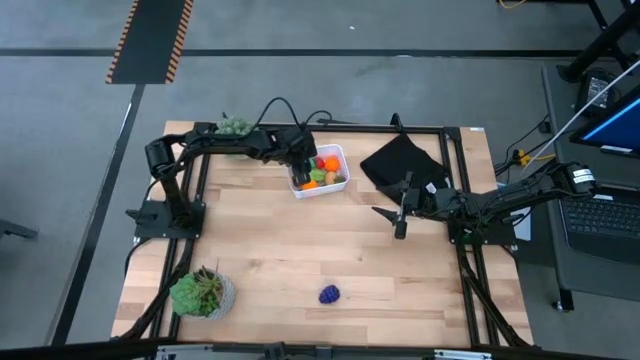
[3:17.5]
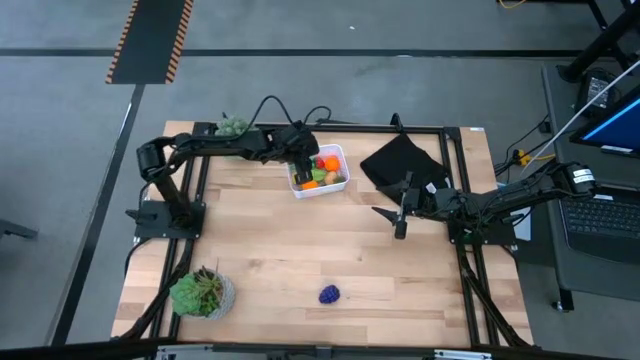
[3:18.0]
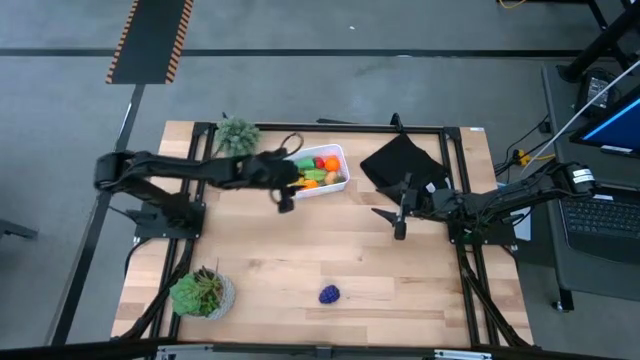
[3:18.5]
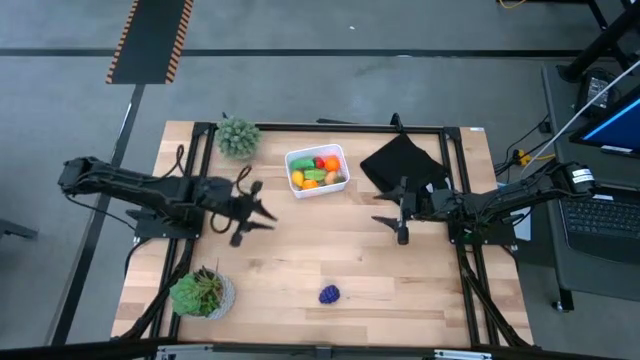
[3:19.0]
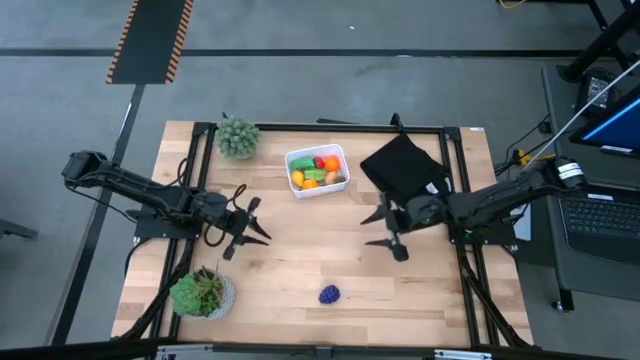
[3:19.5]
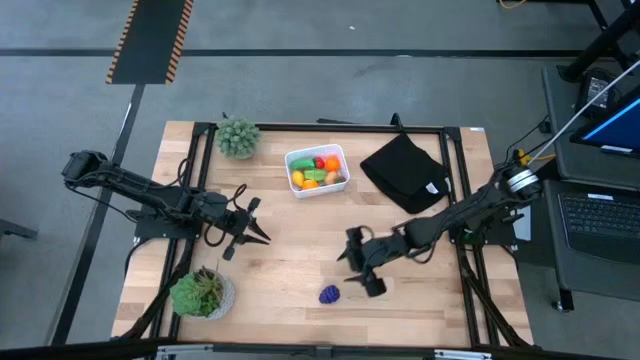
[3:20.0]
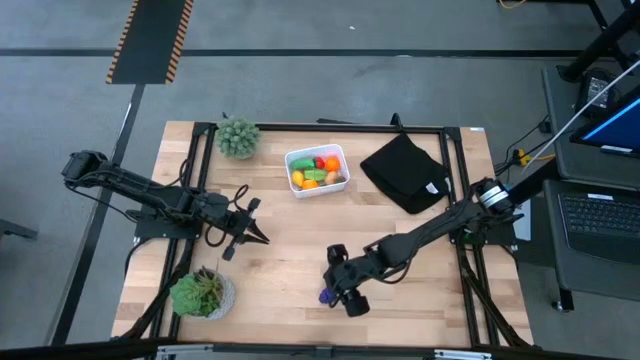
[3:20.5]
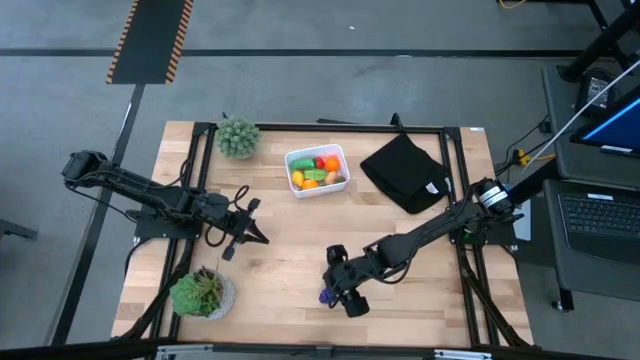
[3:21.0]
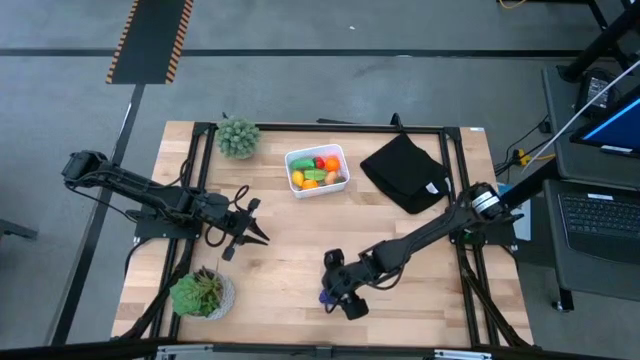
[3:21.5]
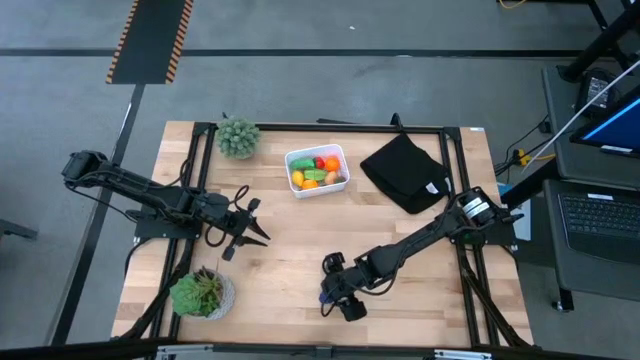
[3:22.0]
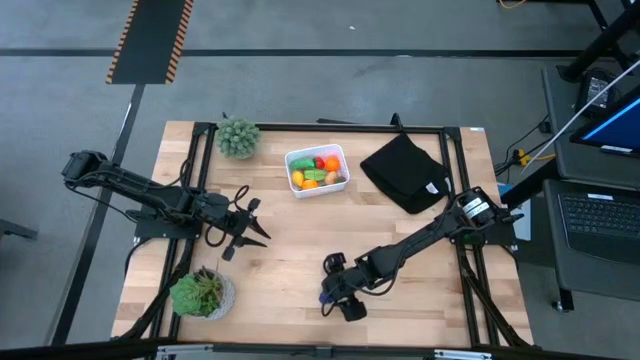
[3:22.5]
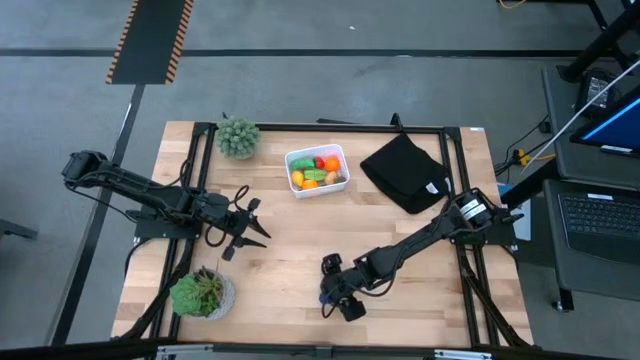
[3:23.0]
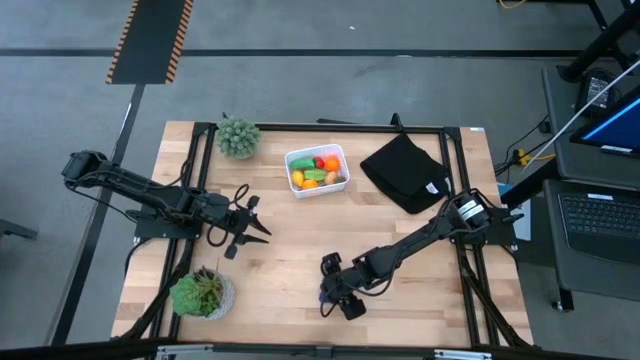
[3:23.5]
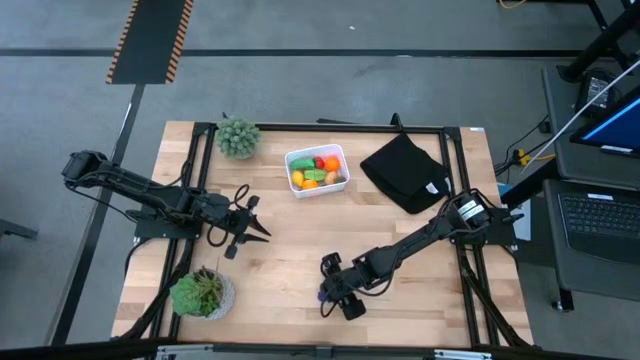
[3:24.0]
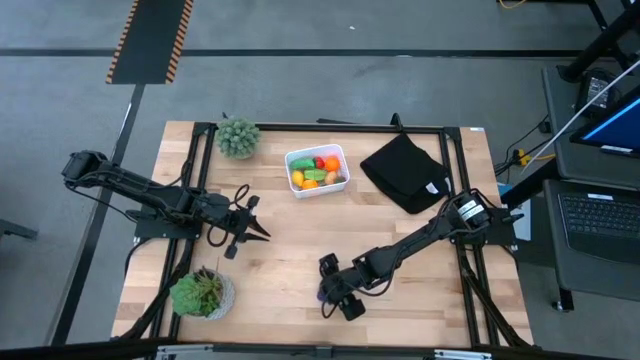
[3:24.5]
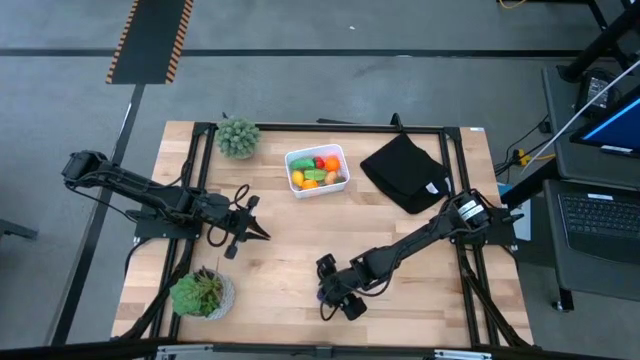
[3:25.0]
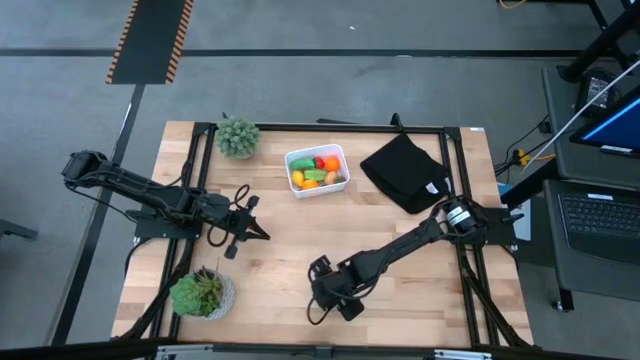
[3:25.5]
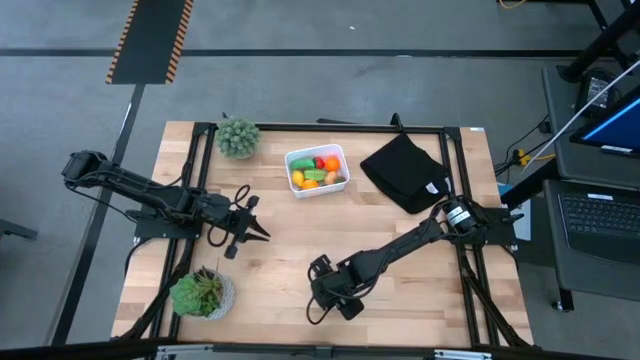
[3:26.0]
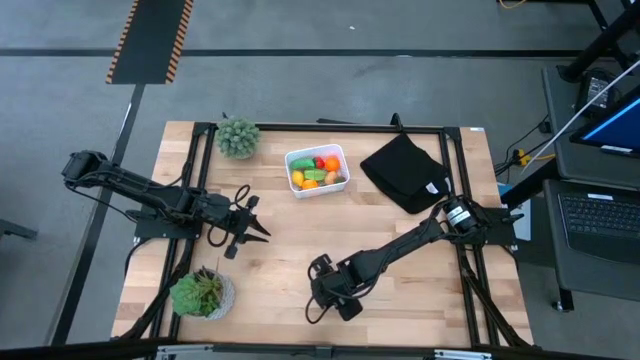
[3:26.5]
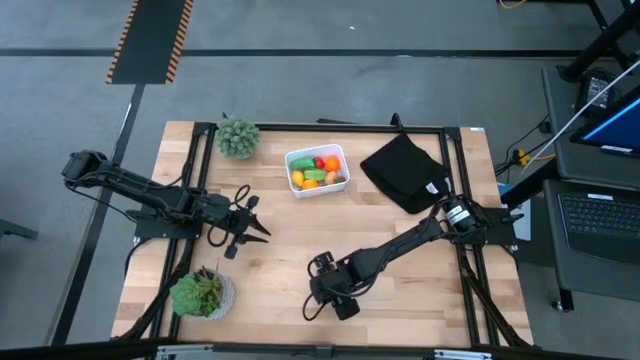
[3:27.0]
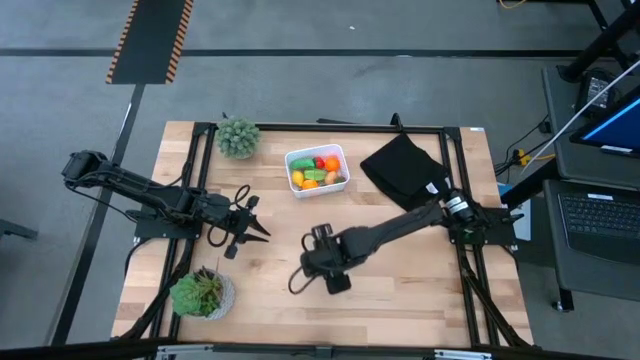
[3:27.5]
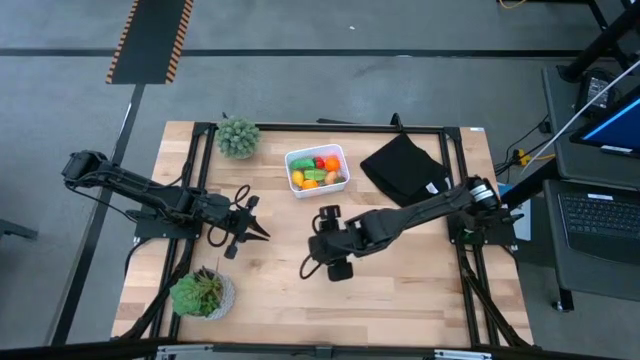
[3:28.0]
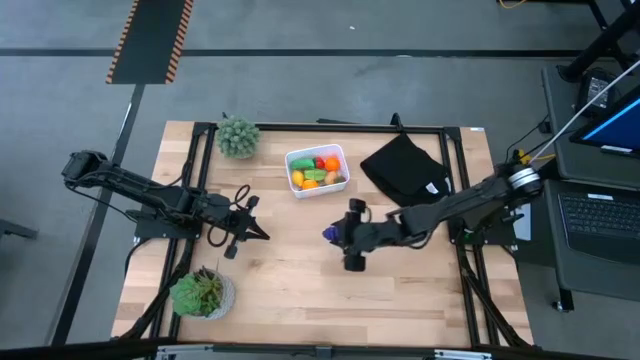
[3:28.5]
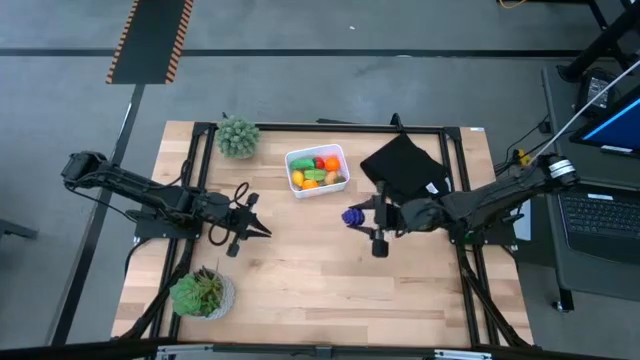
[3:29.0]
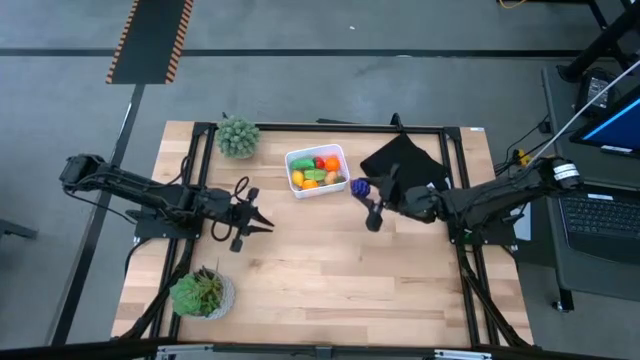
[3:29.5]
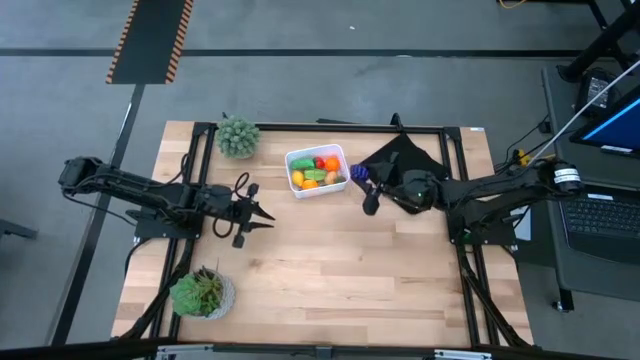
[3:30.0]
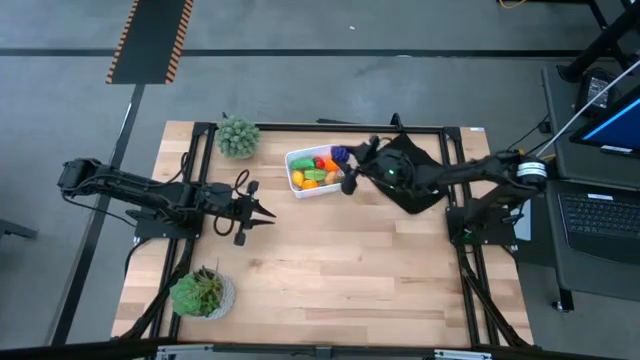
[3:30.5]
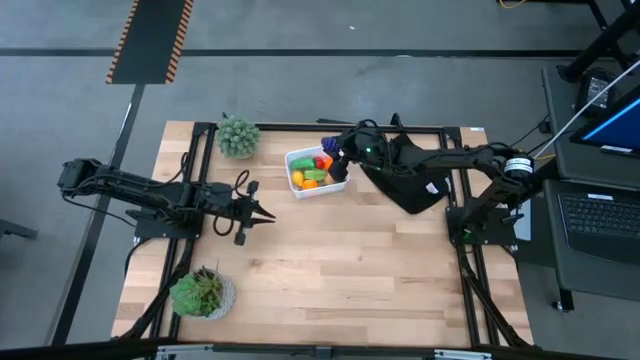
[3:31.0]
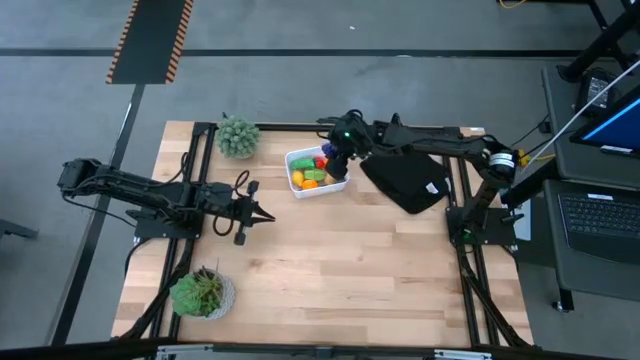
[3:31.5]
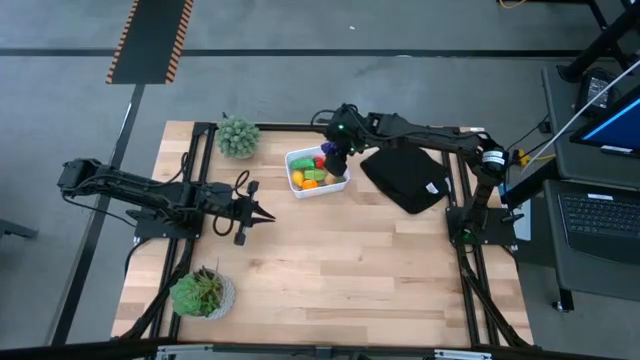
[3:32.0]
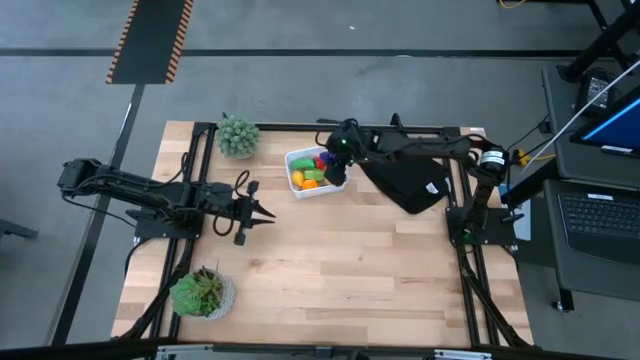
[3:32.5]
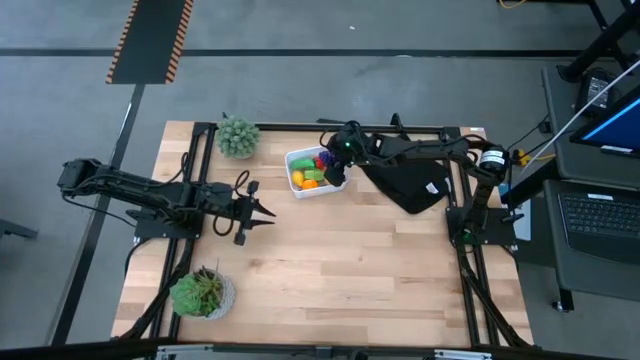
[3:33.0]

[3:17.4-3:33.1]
Task: Pick and placing Produce into tupperware
Put the grapes into the white bin

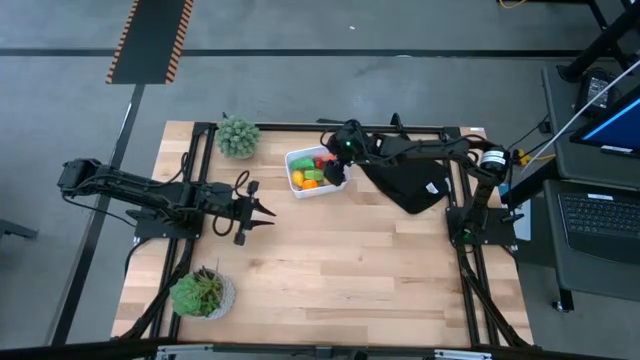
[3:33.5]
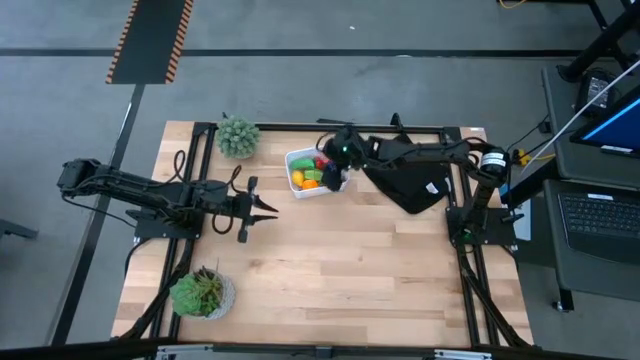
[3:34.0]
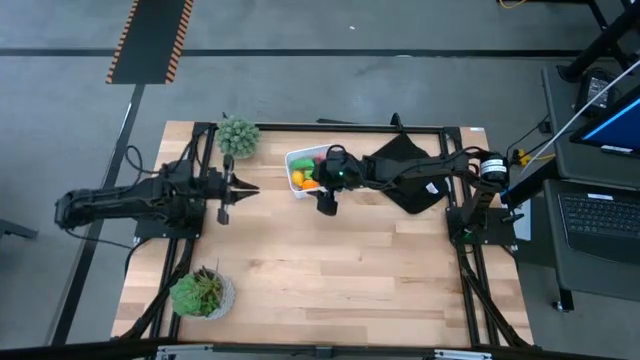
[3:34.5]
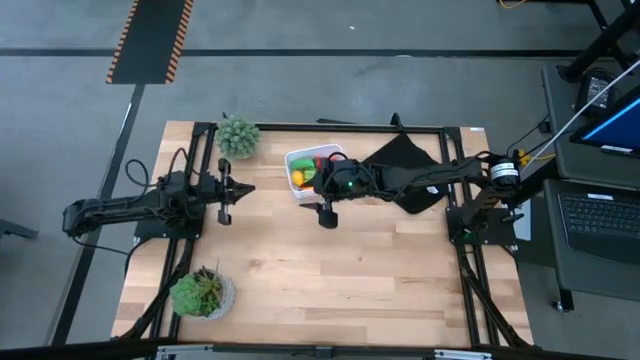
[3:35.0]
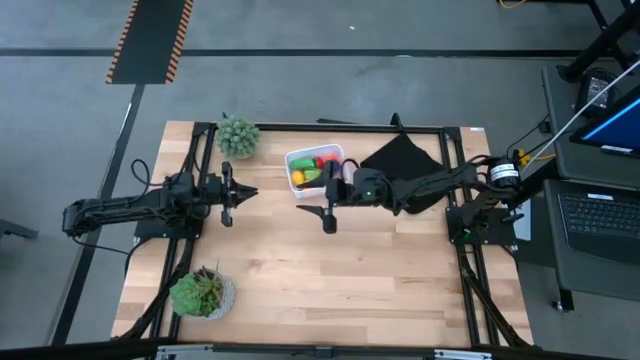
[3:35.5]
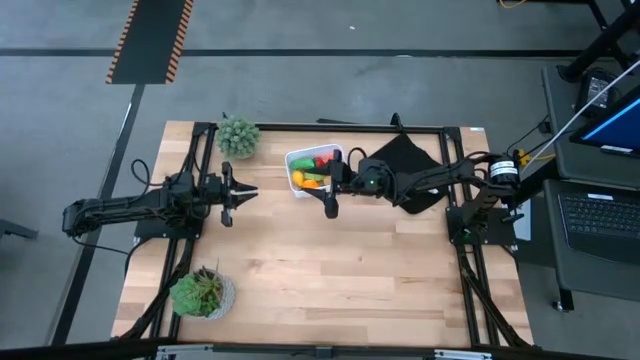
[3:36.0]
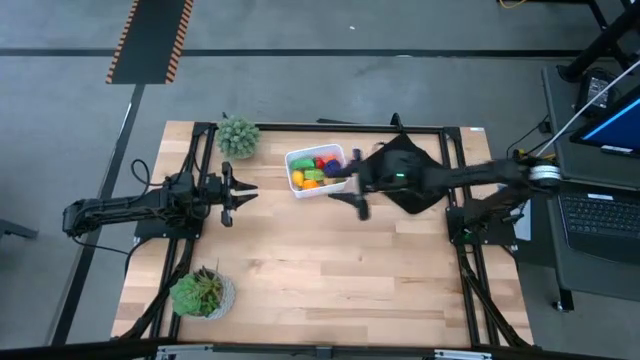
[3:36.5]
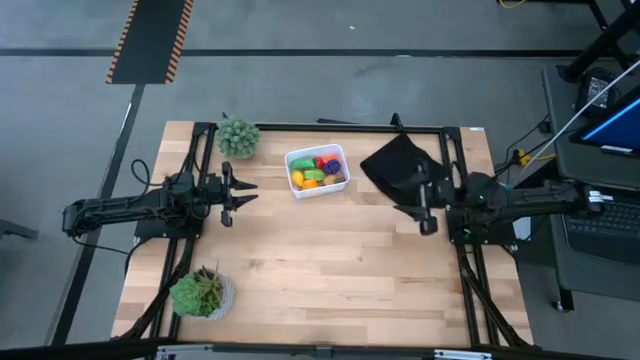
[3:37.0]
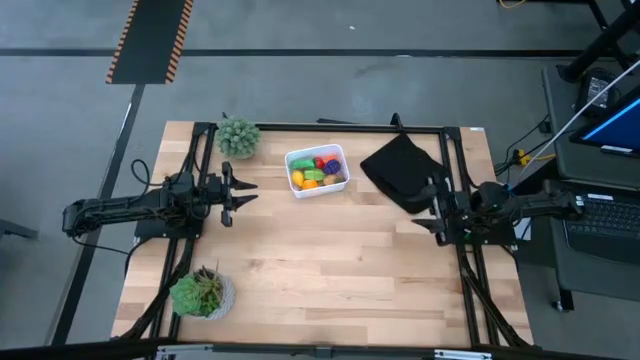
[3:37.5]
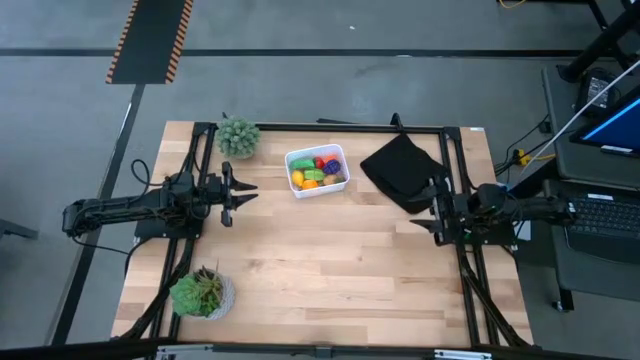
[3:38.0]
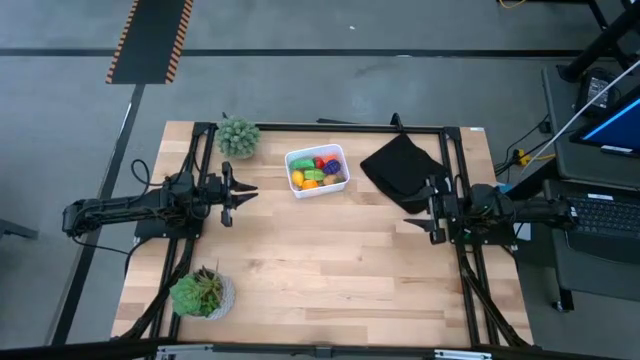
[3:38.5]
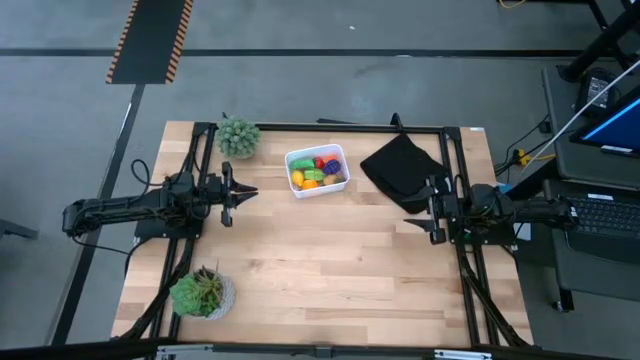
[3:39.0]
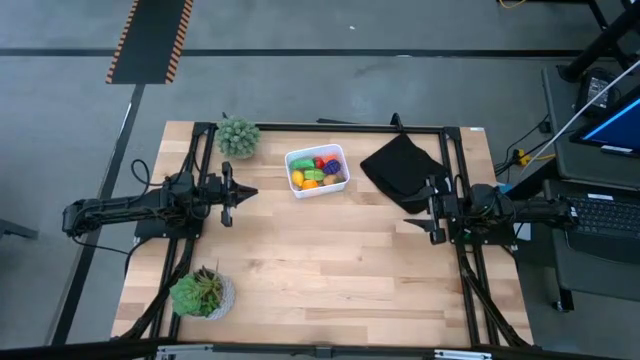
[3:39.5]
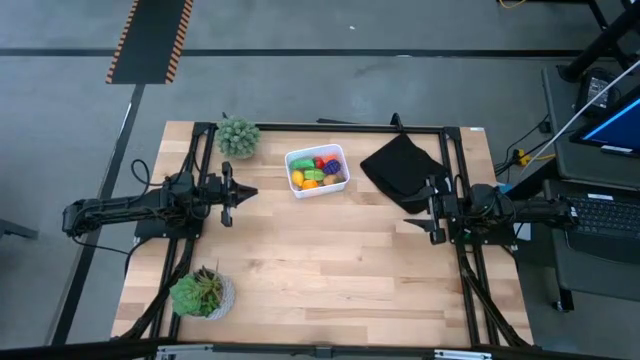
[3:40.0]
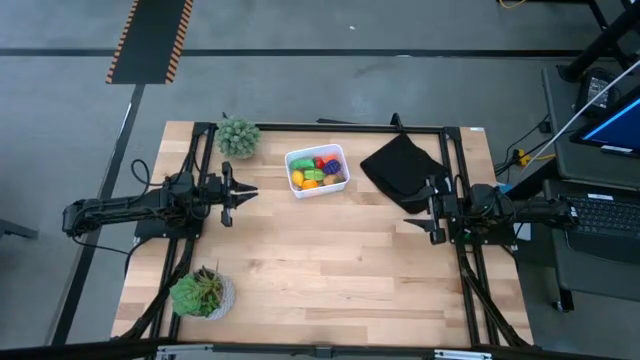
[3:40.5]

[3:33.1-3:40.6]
Return to Home Position
